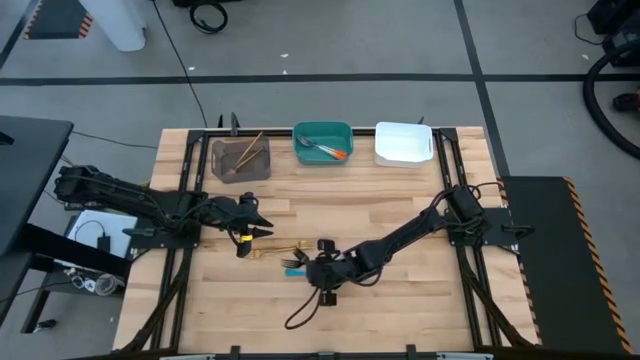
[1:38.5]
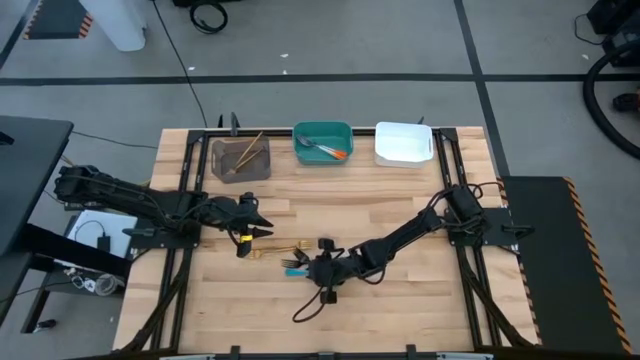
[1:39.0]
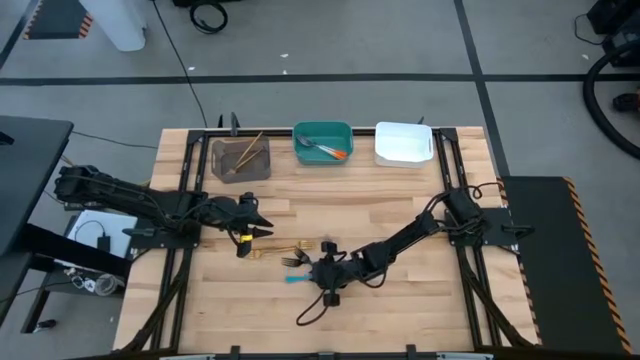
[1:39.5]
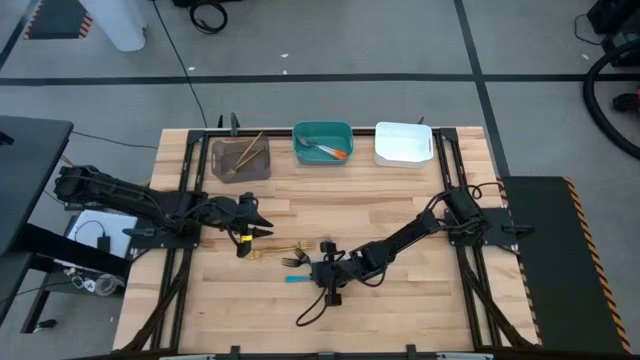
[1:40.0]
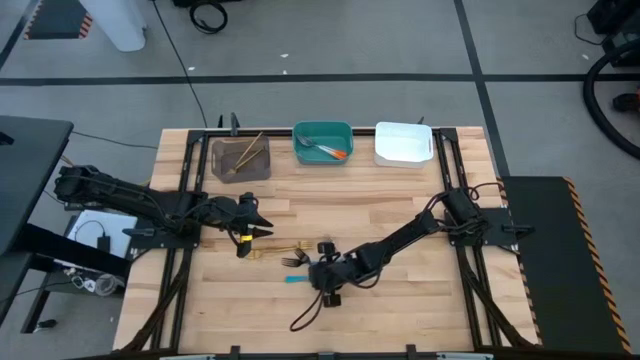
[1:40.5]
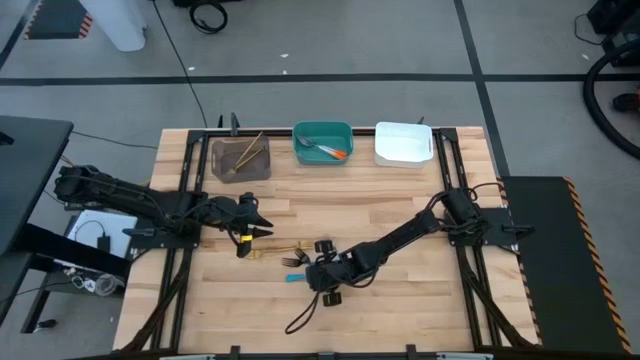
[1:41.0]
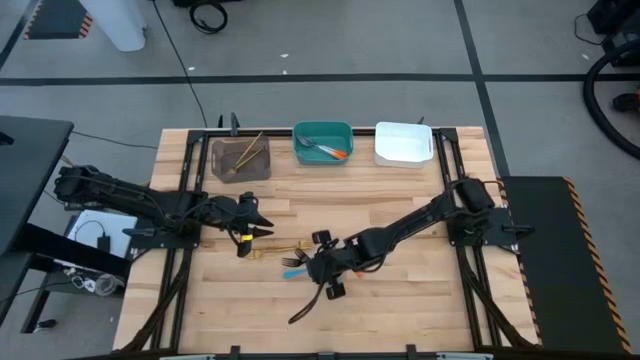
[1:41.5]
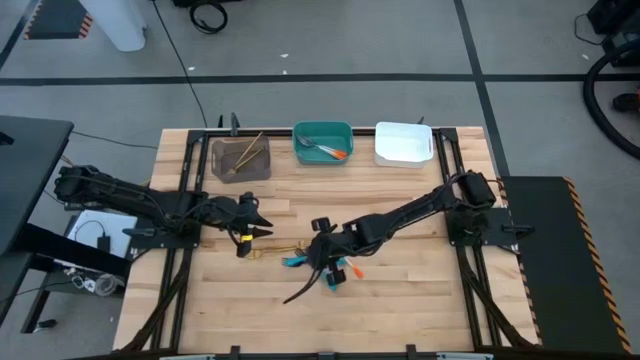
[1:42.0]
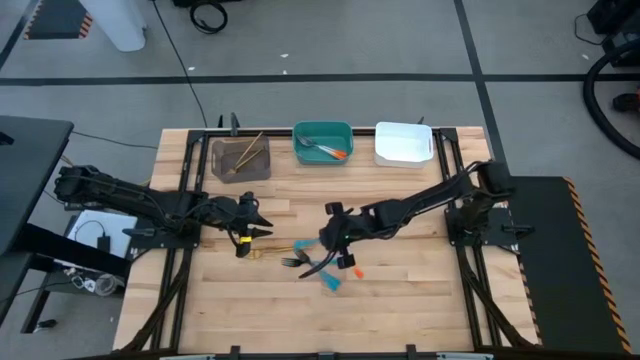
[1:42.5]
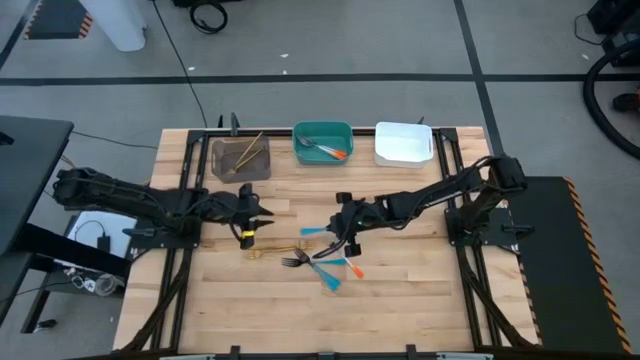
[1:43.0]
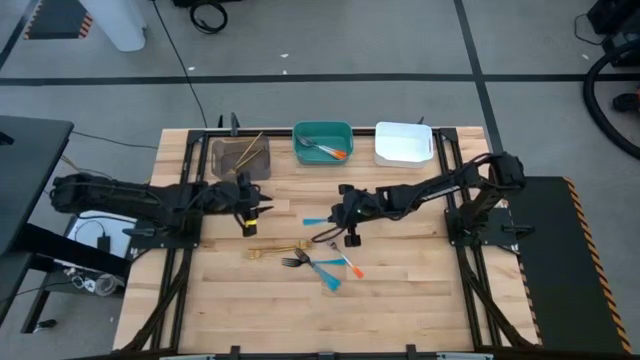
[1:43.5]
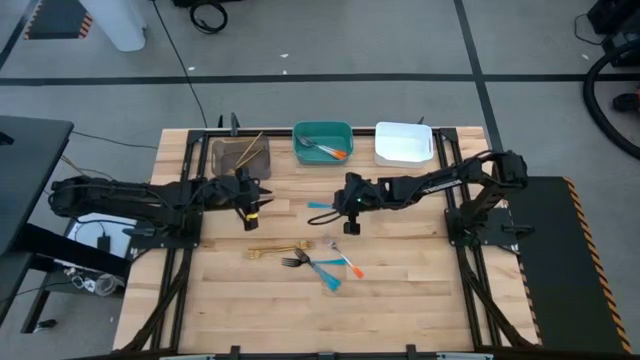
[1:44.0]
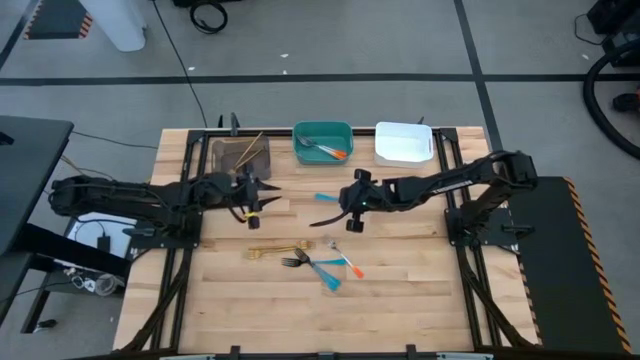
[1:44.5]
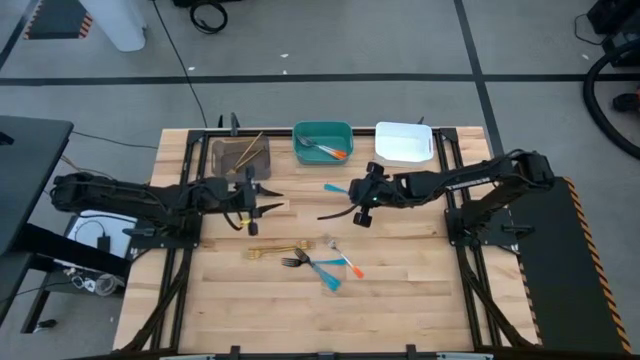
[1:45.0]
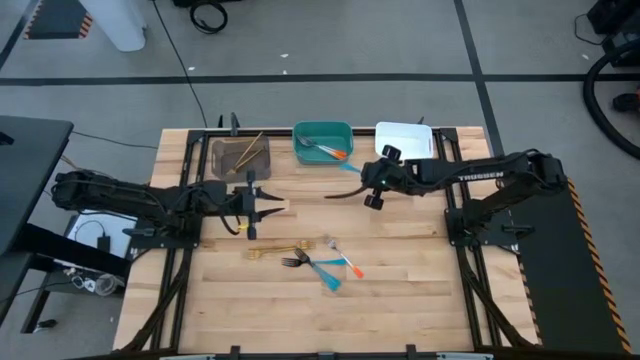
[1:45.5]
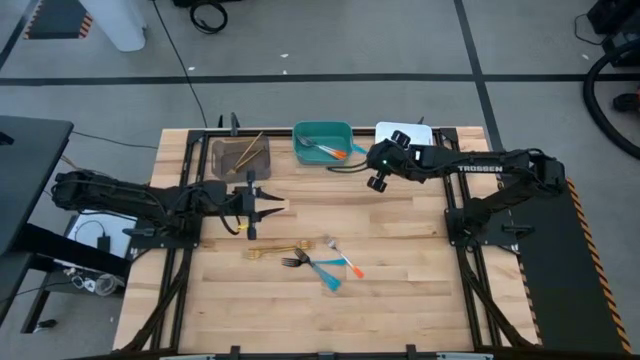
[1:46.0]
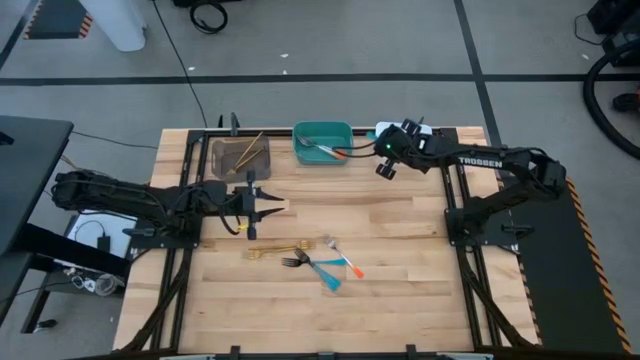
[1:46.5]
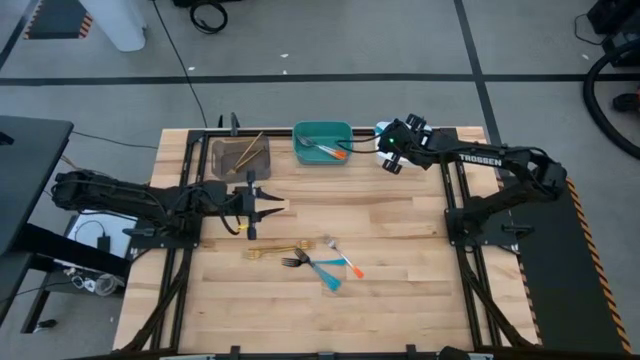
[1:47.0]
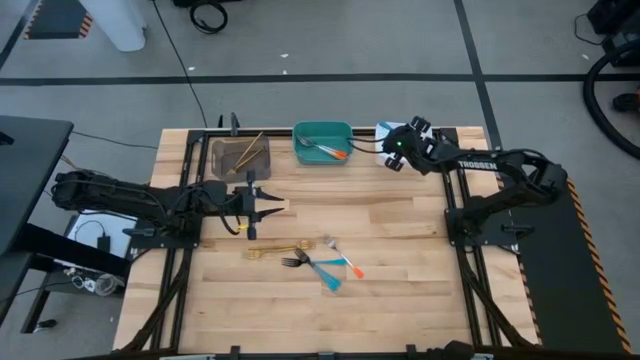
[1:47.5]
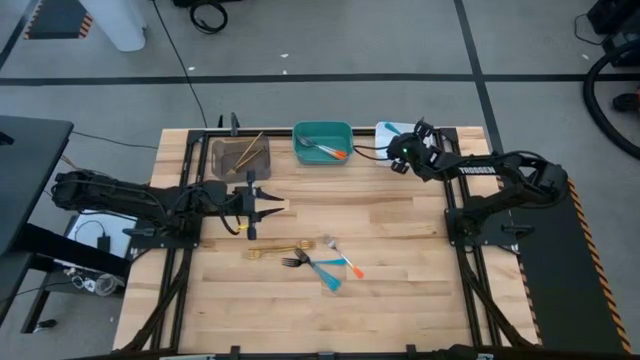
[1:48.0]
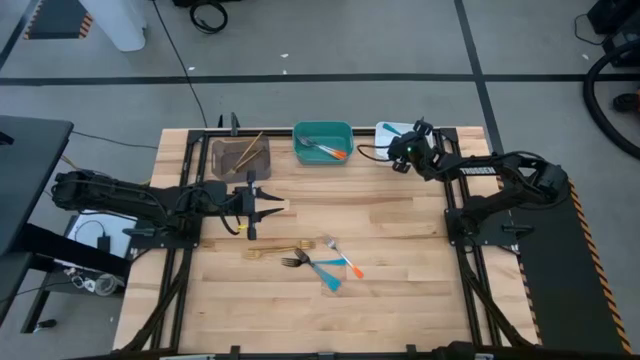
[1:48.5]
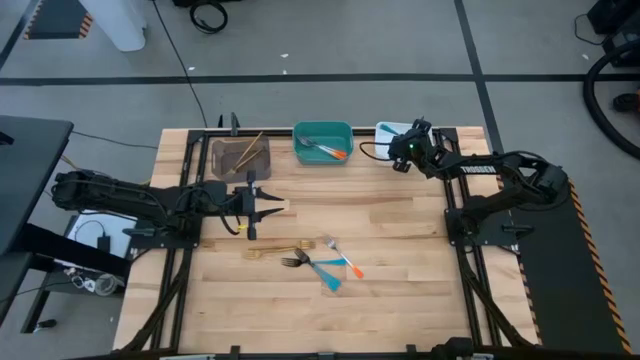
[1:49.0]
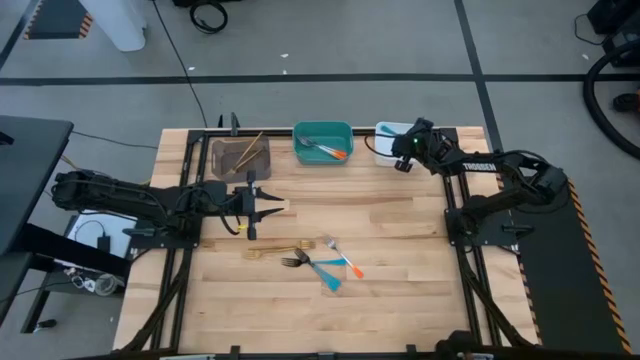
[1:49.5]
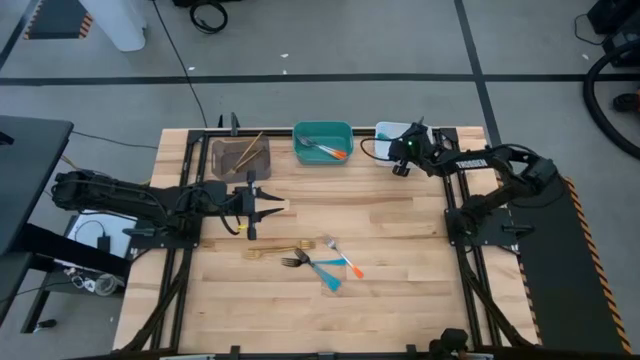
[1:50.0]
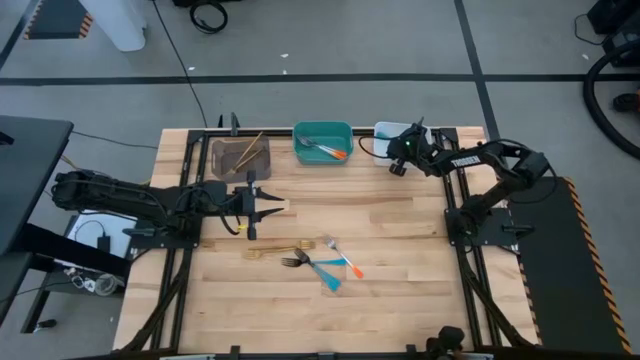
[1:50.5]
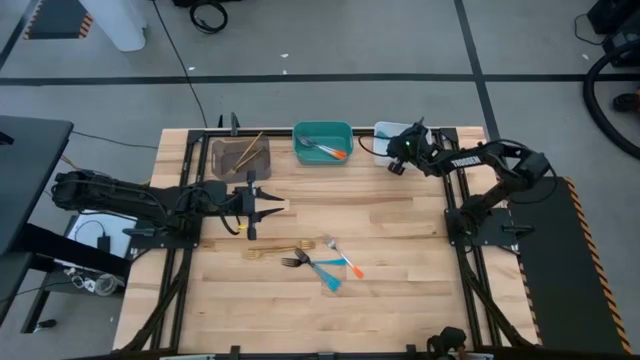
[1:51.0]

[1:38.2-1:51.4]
Task: Sort silverware by color (type)
Put the blue fork into the white bin
